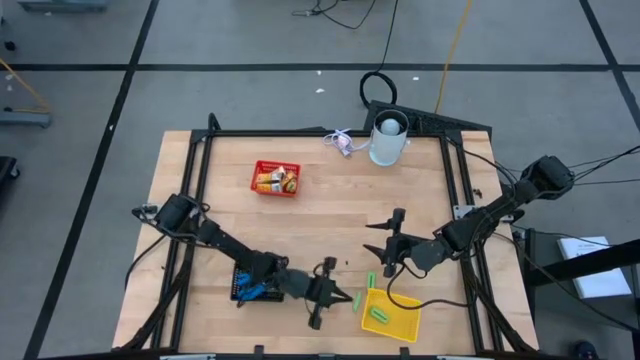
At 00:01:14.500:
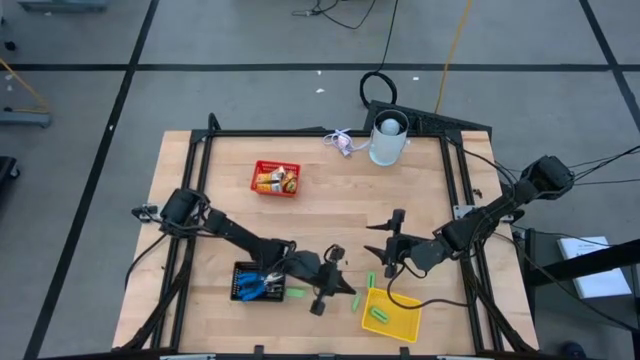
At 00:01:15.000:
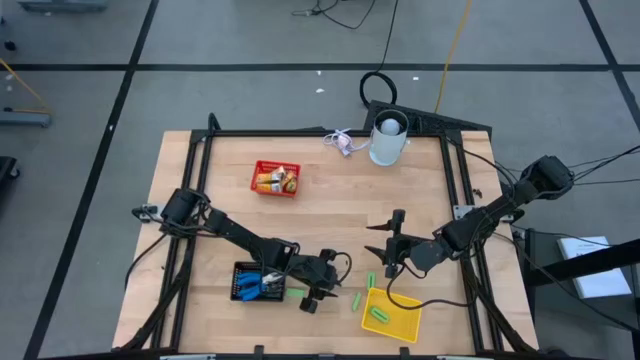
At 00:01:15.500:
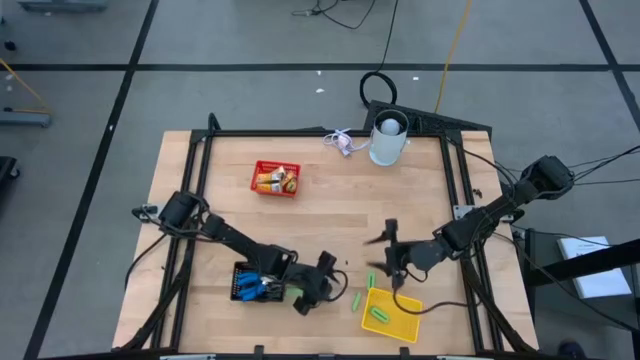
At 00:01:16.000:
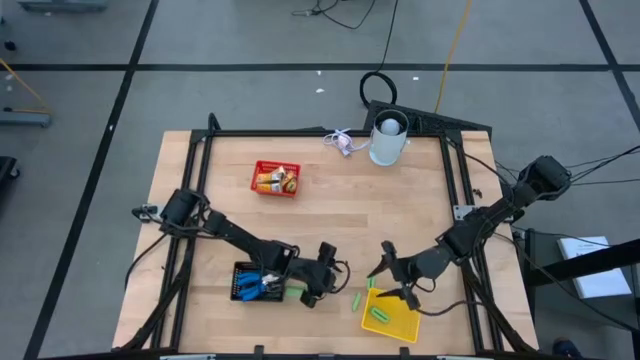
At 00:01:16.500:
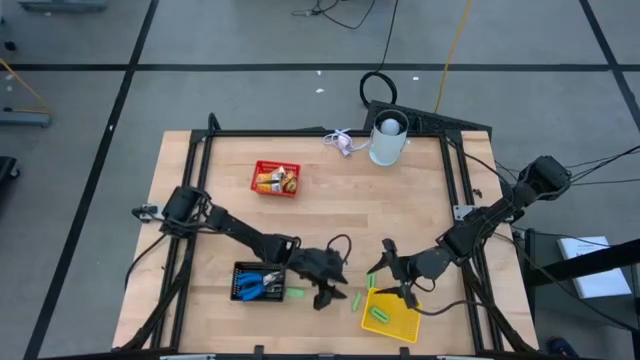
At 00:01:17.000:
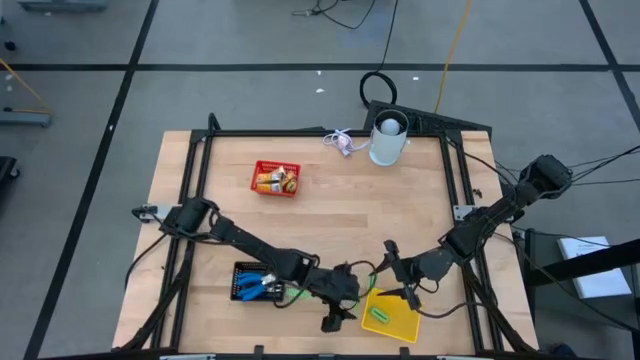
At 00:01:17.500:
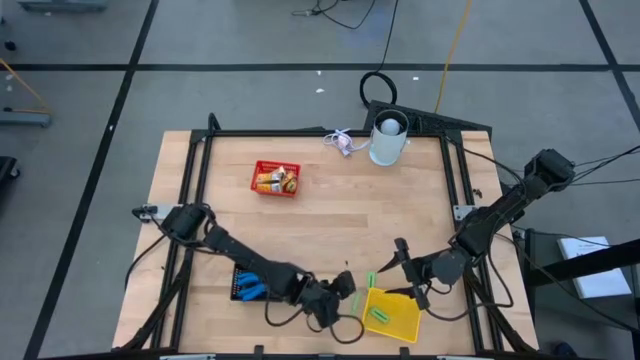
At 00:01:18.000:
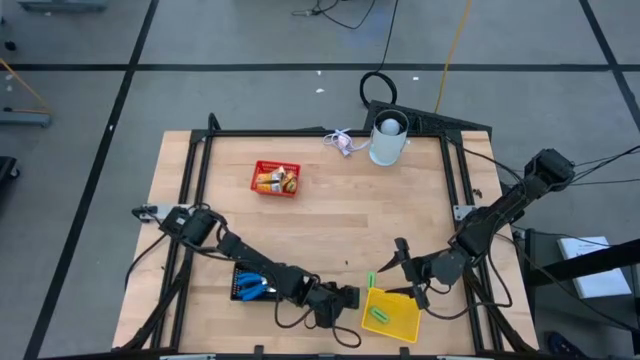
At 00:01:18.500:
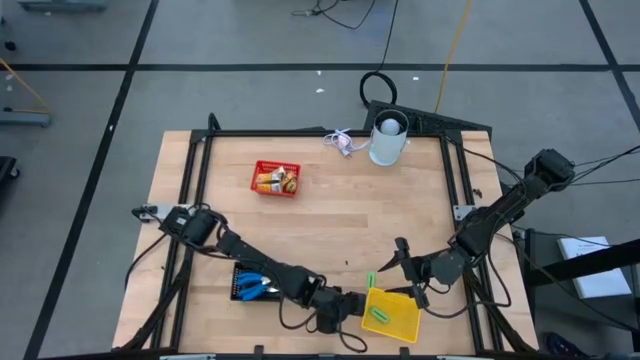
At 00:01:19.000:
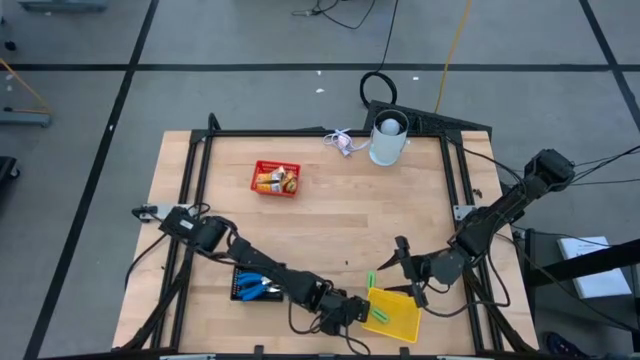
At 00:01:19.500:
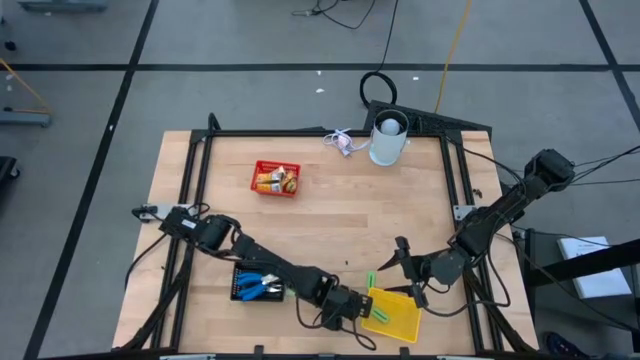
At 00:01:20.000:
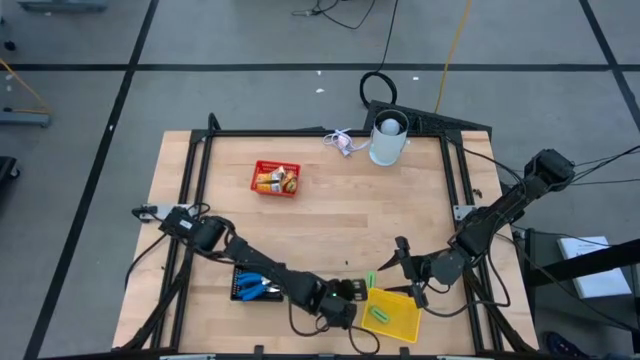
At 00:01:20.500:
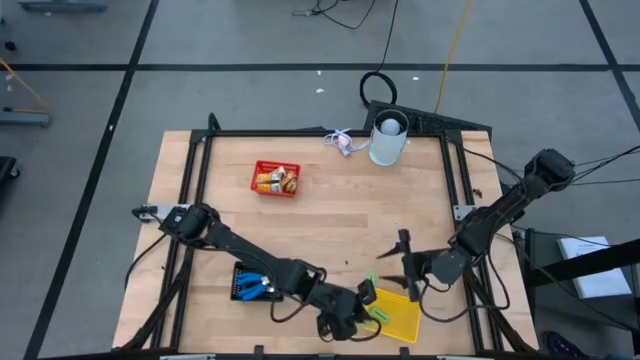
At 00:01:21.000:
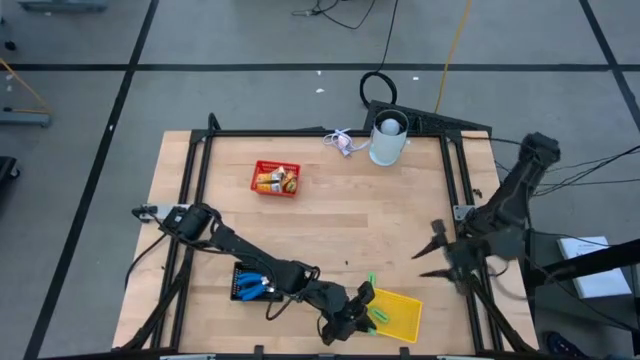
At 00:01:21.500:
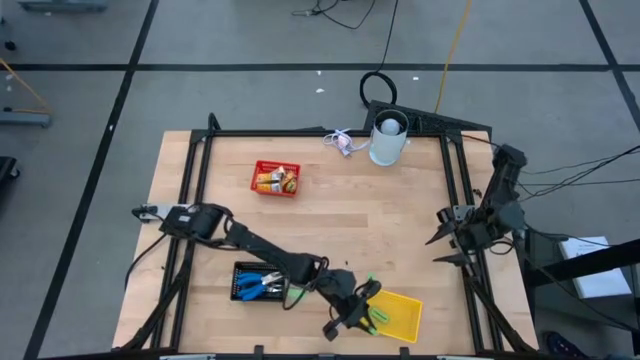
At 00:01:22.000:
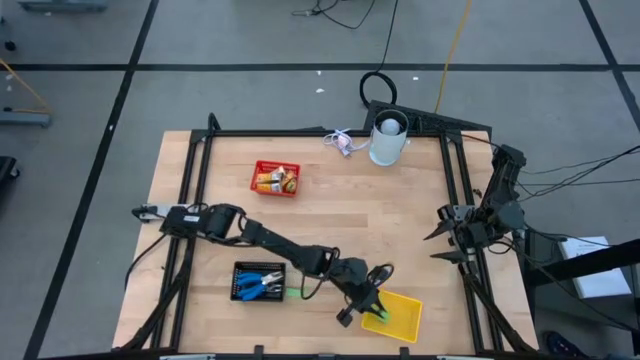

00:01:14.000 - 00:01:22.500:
Task: Pick & Place School Supplies
Put the green eraser into the yellow bin

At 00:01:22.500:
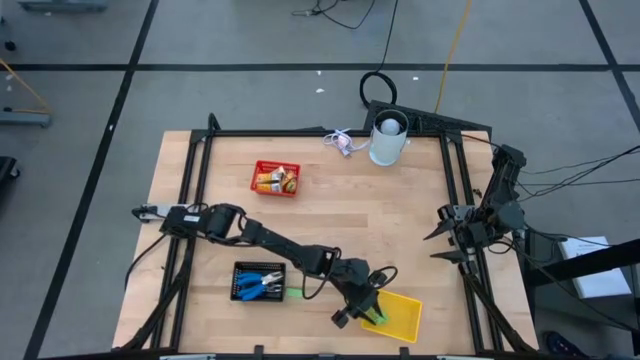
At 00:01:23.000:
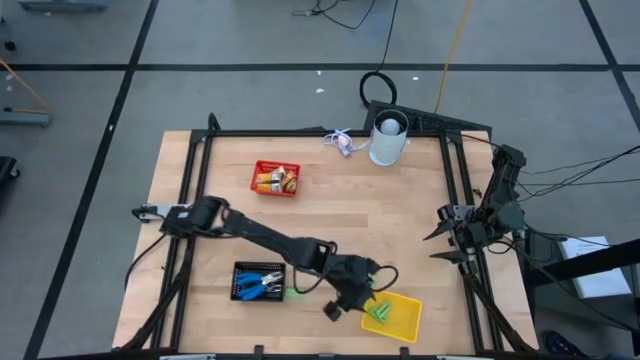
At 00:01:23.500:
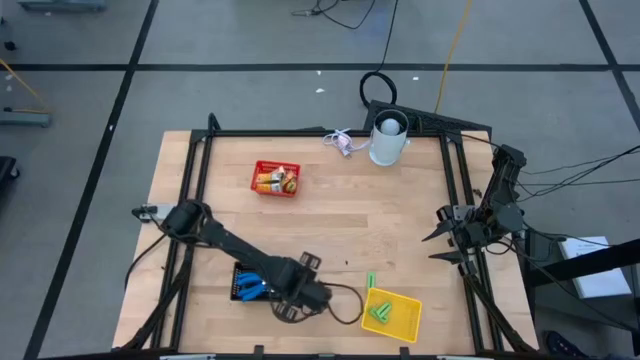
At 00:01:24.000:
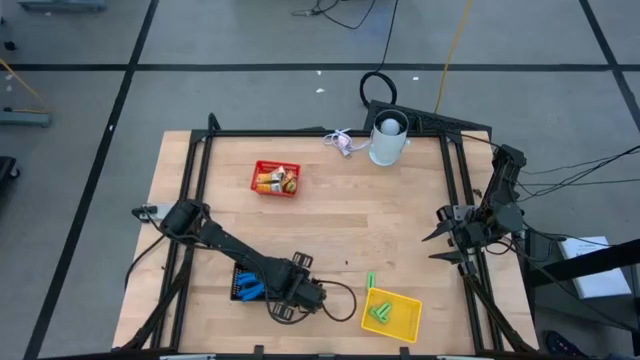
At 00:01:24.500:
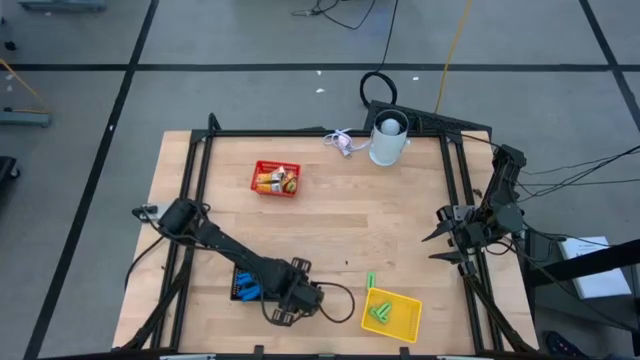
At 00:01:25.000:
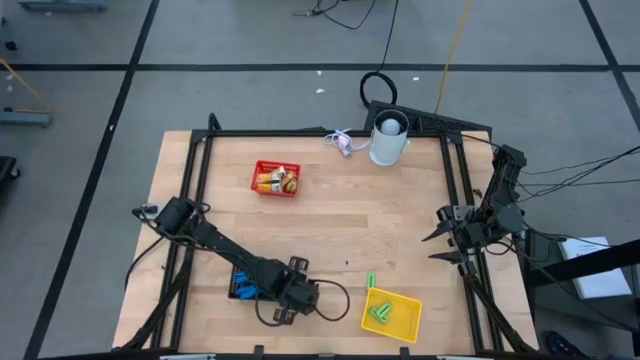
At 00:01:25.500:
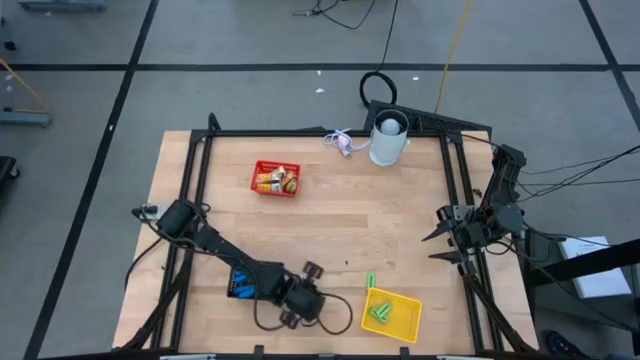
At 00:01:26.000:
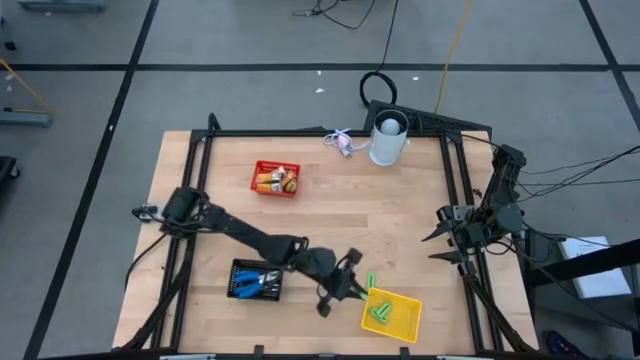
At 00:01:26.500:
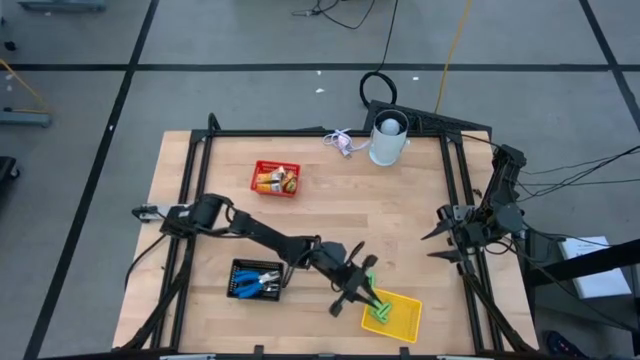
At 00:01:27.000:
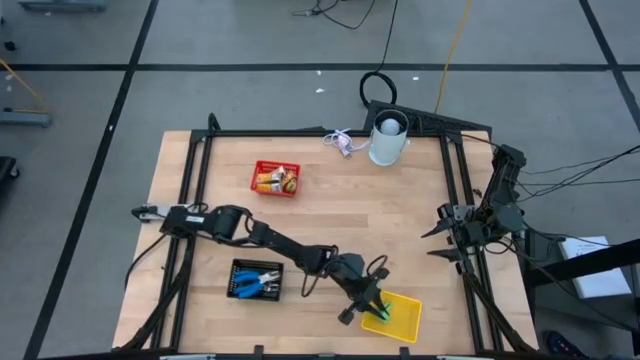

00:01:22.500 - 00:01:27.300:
Put the green eraser into the yellow bin

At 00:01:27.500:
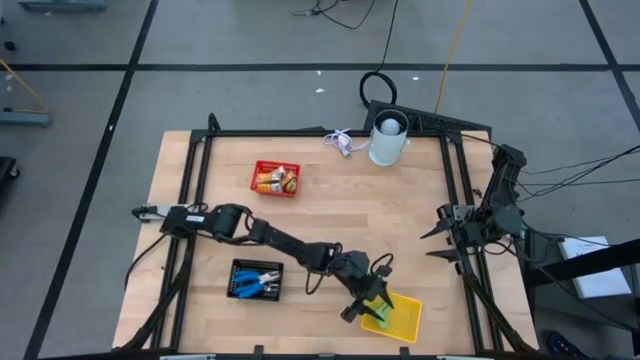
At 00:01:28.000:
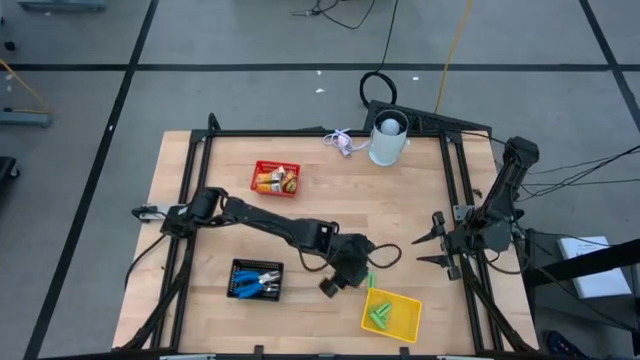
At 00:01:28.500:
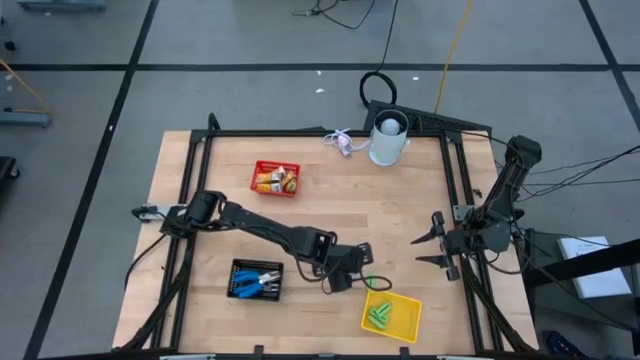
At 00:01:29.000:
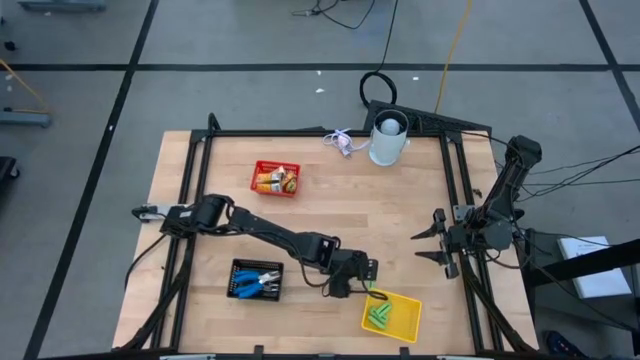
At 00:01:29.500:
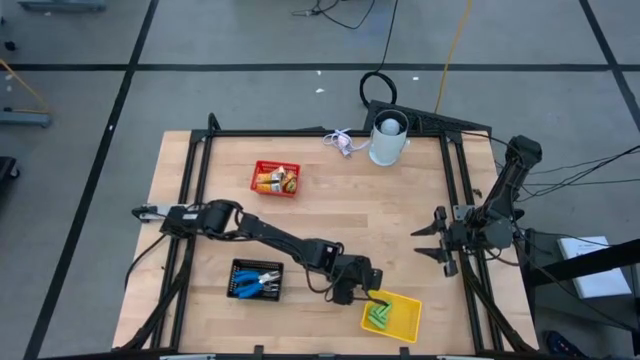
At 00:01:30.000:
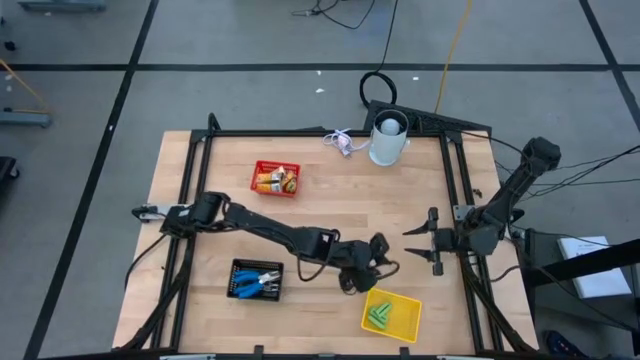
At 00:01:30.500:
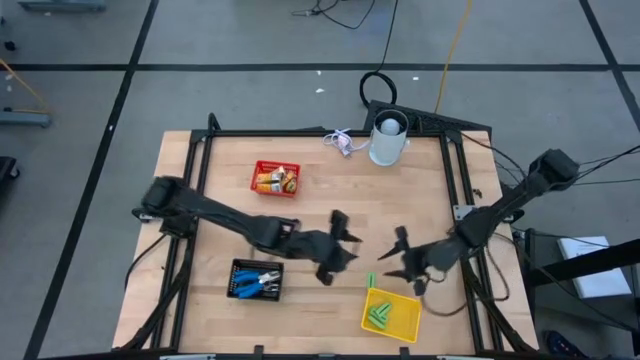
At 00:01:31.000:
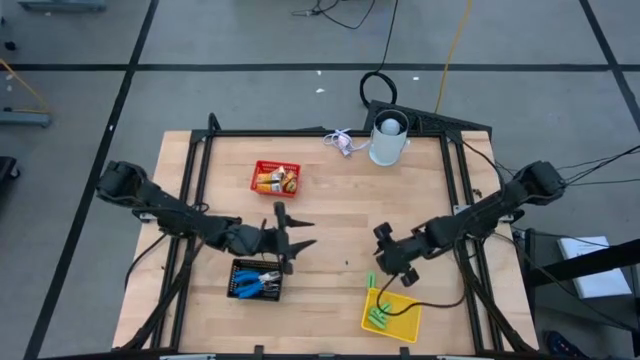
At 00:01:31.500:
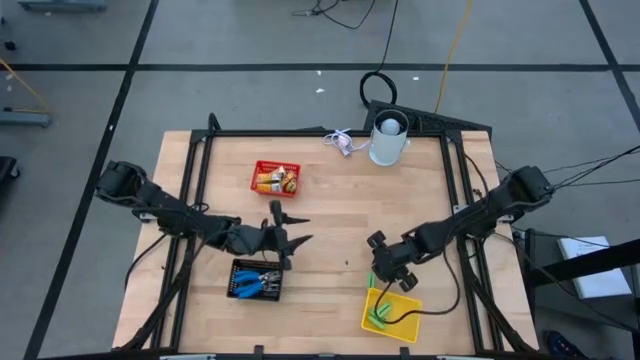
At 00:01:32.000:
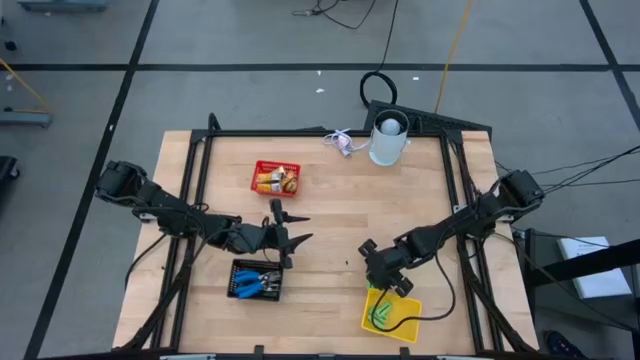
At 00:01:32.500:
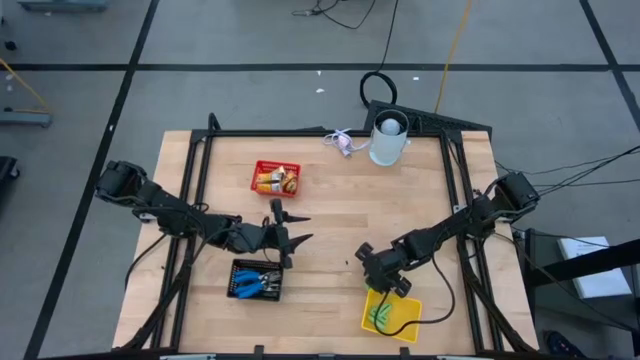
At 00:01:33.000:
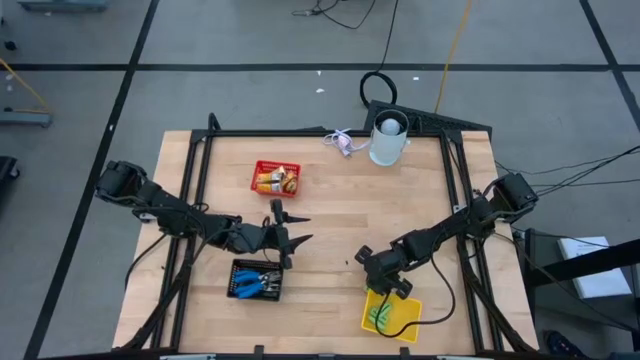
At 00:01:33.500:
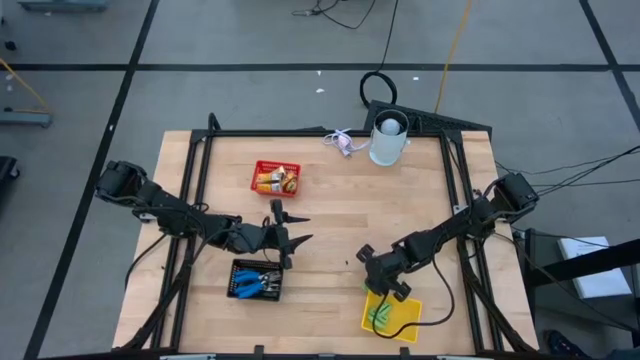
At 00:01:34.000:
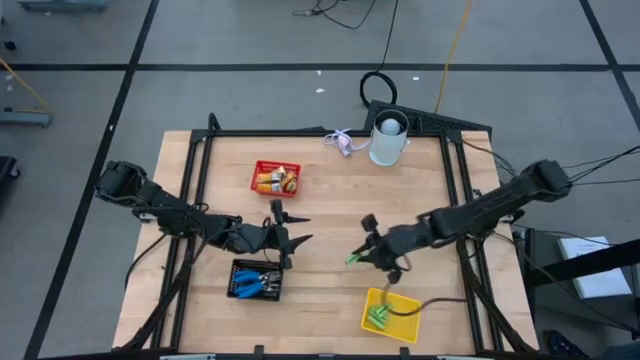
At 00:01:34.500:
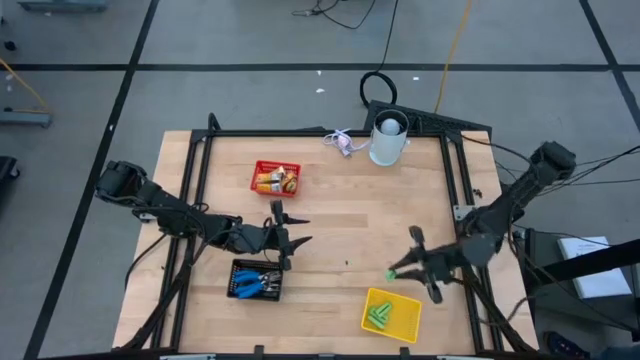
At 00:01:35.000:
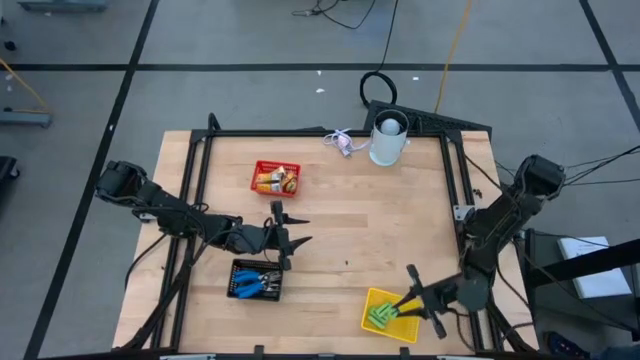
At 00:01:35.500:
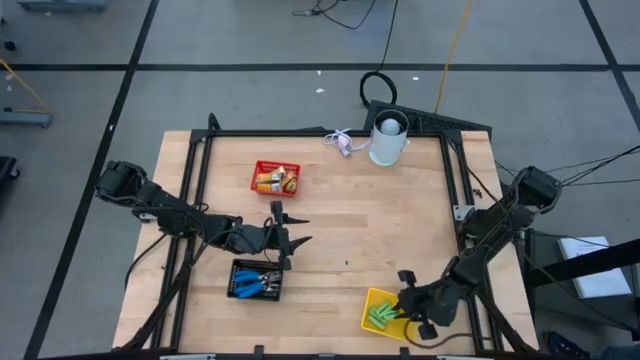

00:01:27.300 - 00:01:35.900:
Put the green eraser into the yellow bin
